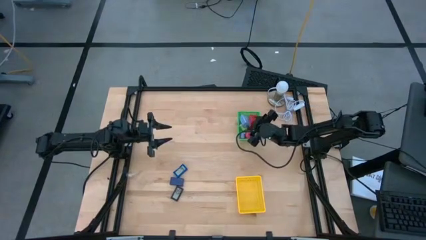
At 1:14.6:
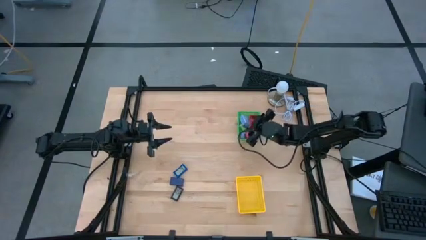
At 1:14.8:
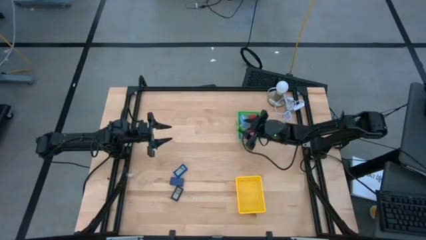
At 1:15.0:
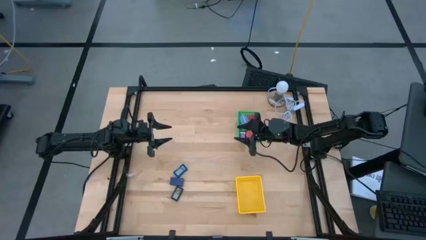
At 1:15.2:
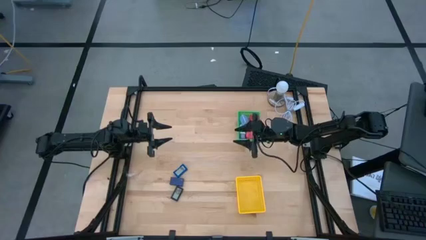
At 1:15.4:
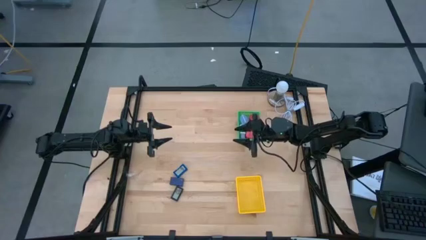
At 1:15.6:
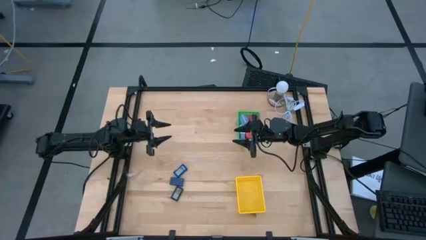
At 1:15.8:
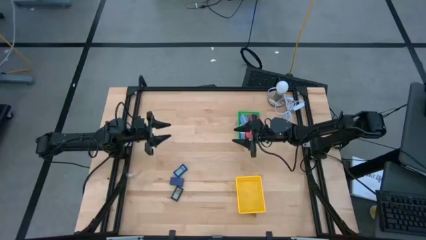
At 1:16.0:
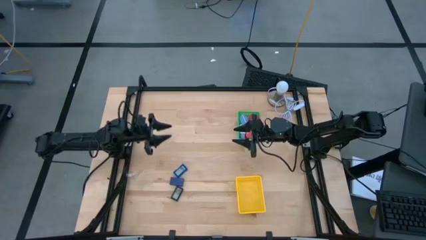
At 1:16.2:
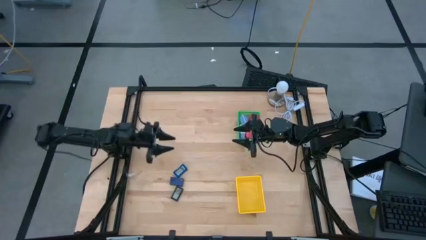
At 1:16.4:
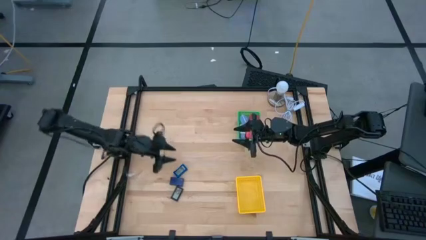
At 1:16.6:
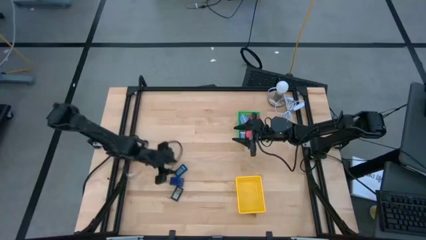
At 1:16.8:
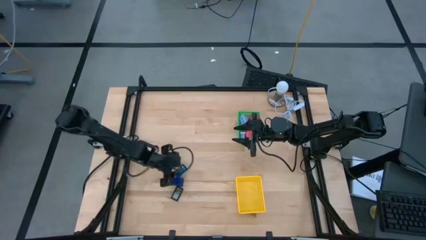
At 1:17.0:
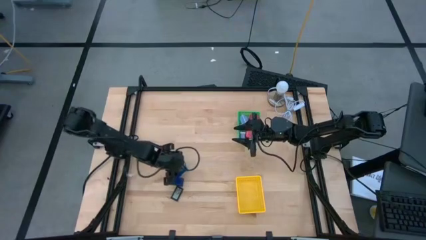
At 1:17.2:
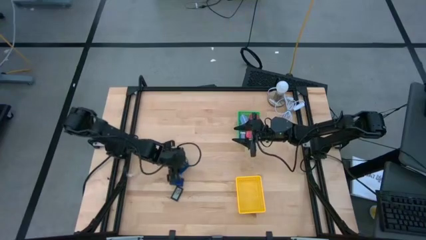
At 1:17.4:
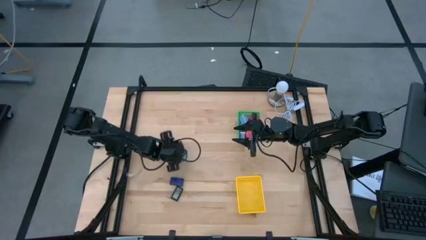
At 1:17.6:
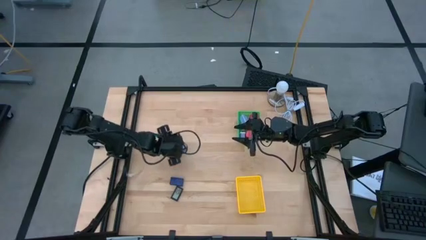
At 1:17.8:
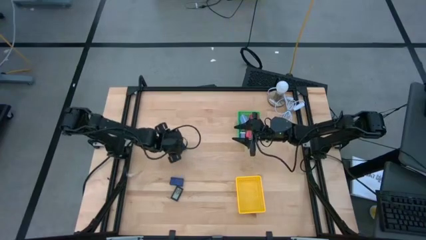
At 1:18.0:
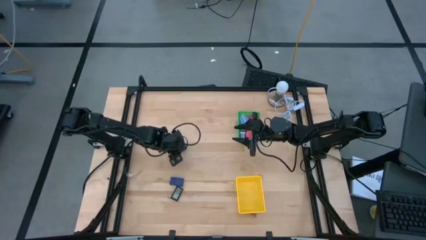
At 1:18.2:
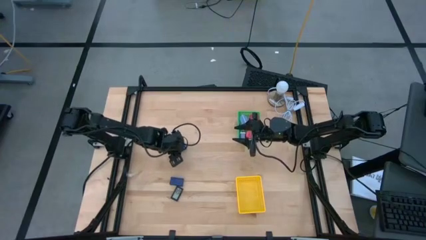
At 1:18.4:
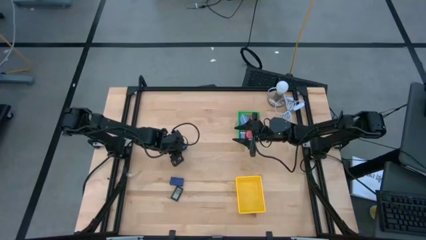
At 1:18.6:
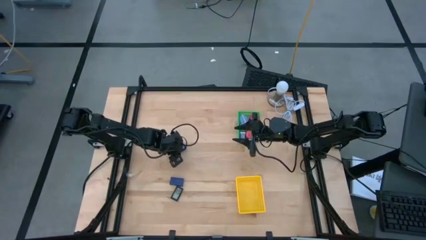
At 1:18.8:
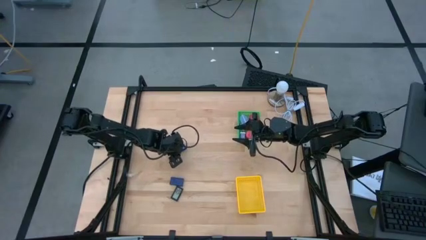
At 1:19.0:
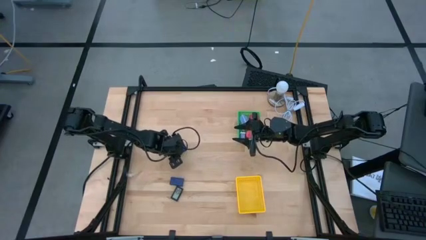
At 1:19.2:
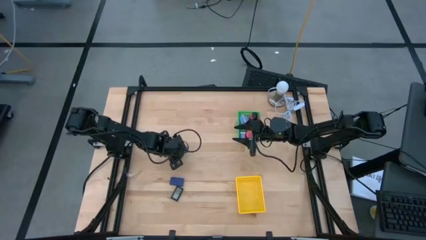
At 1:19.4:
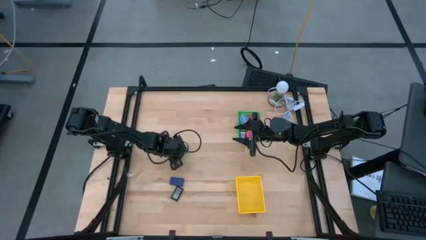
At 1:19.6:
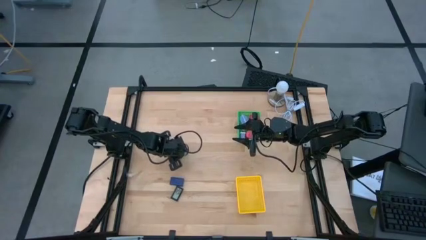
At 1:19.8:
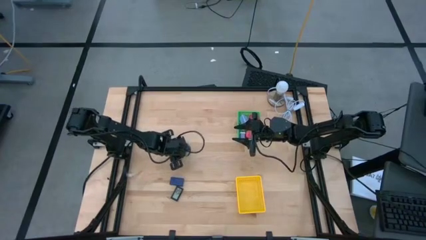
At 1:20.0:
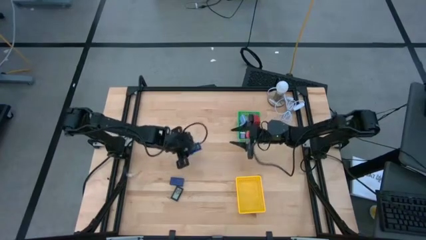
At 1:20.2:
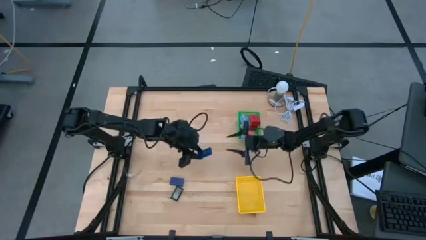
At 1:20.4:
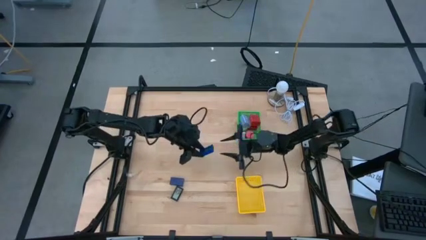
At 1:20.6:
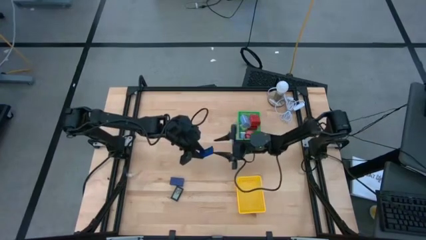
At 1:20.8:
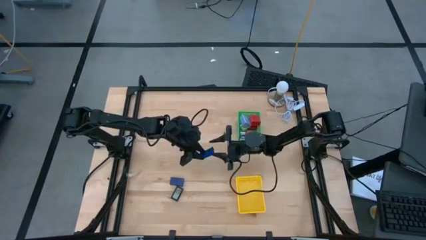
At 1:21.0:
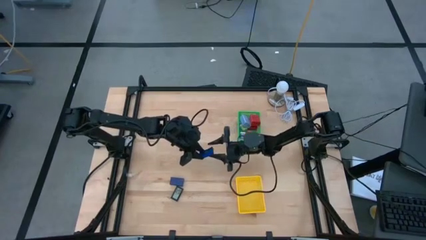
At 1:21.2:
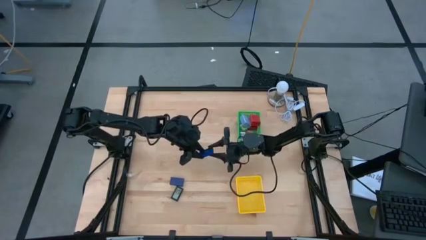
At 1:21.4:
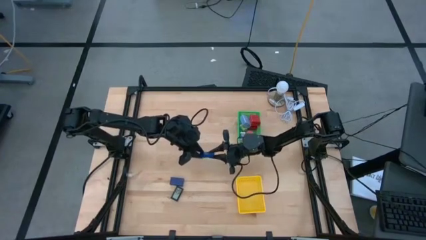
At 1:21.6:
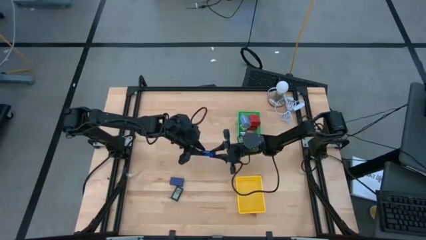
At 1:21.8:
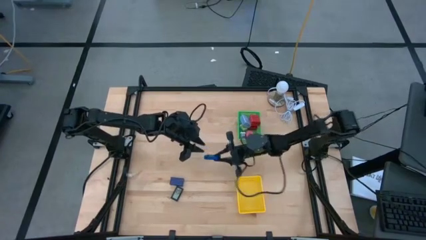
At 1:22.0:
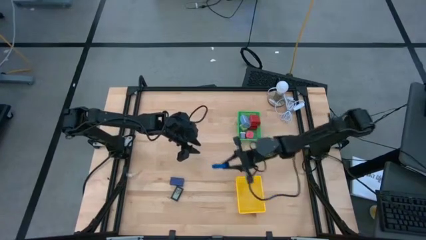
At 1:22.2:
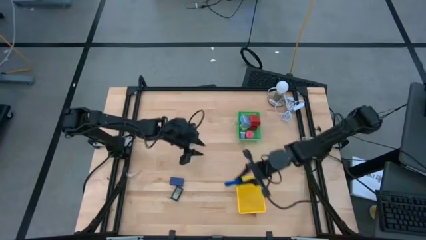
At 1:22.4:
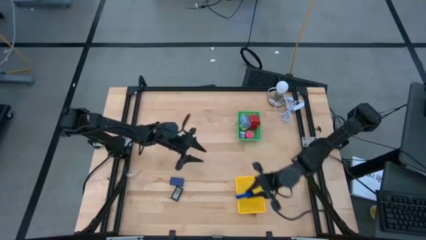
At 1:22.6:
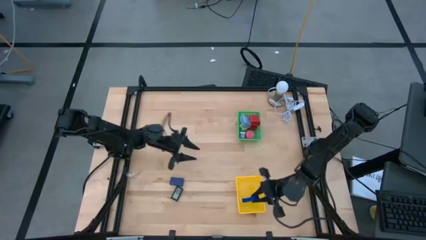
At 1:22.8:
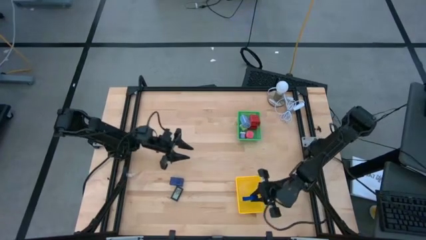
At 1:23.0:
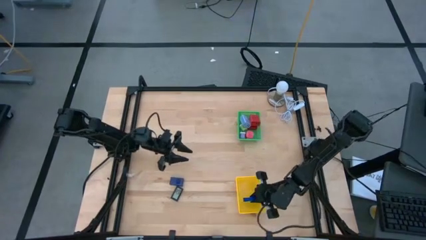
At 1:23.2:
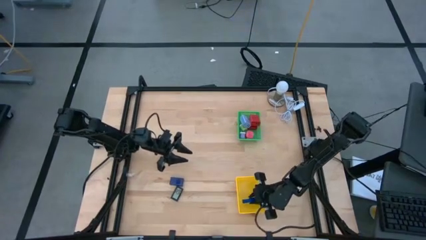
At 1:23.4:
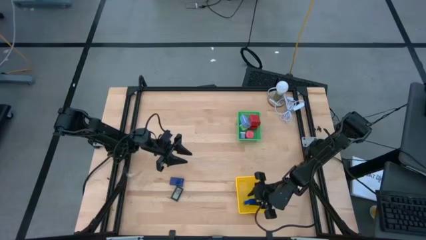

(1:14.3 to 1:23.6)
Task: Pick & Place Office items
Put the blue digital timer into the yellow bin

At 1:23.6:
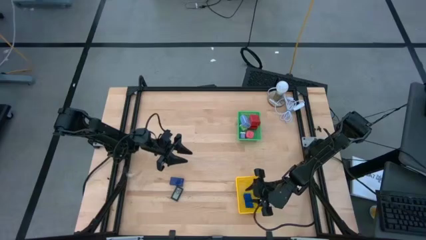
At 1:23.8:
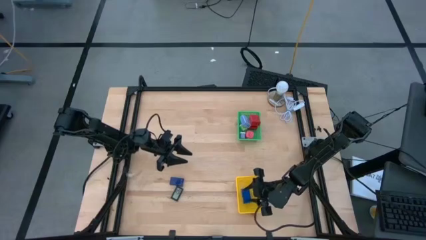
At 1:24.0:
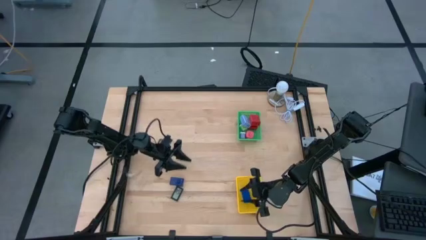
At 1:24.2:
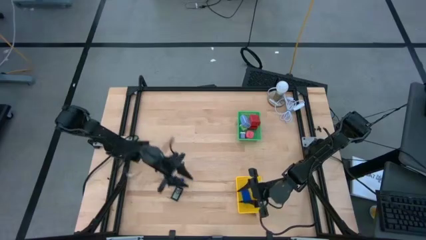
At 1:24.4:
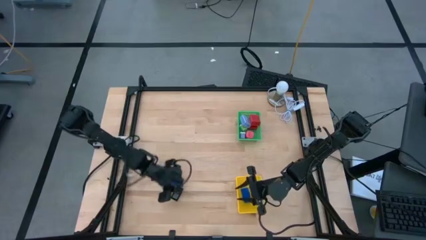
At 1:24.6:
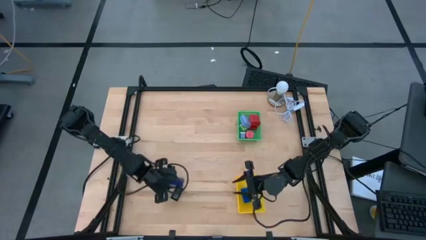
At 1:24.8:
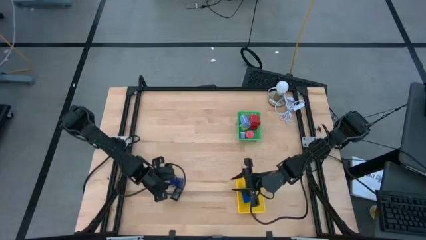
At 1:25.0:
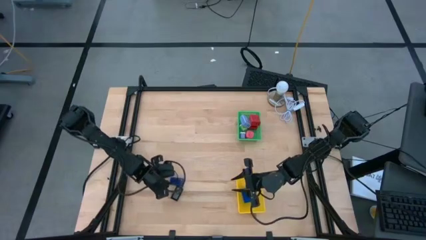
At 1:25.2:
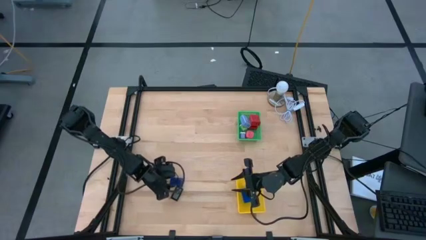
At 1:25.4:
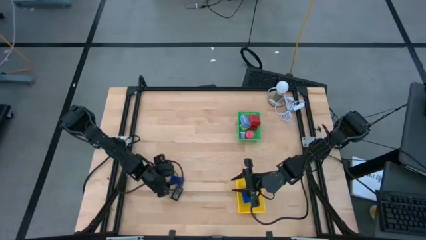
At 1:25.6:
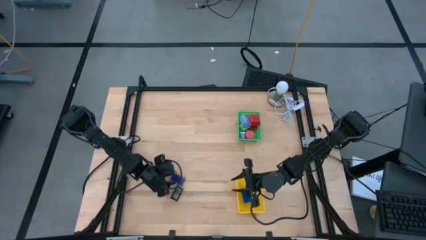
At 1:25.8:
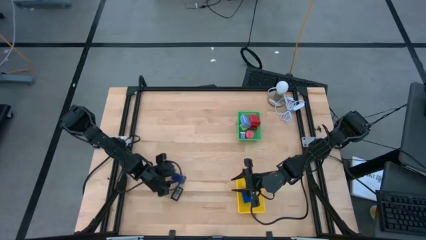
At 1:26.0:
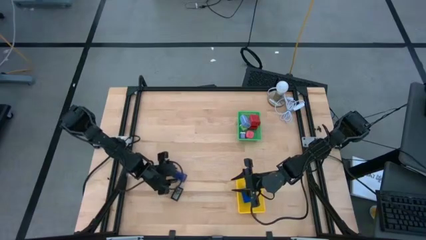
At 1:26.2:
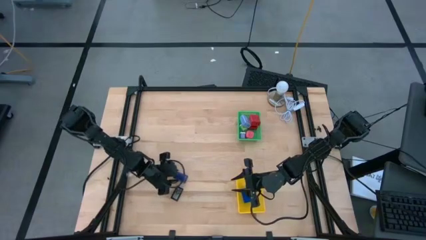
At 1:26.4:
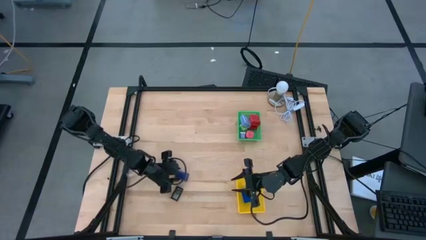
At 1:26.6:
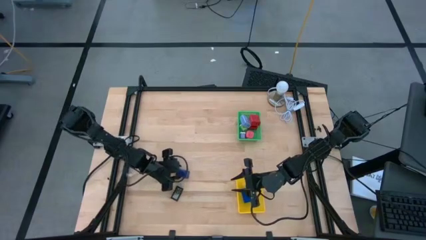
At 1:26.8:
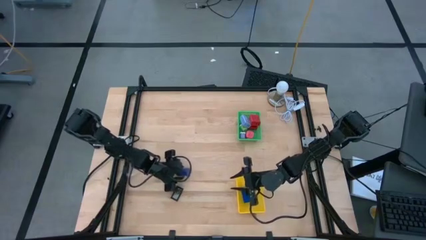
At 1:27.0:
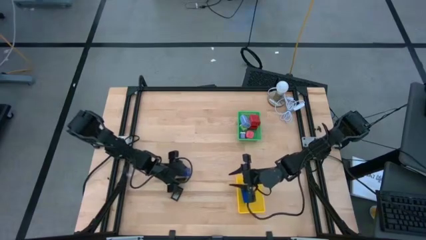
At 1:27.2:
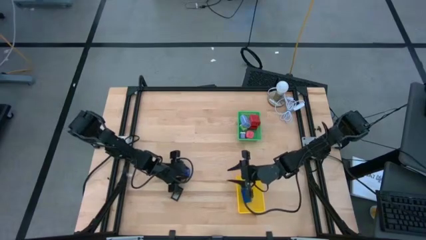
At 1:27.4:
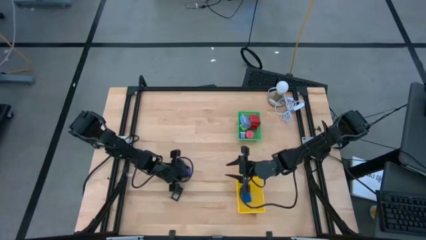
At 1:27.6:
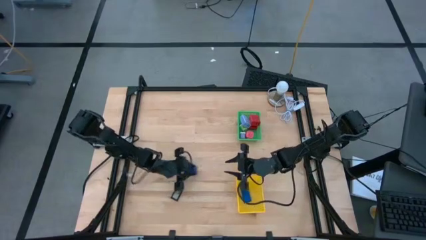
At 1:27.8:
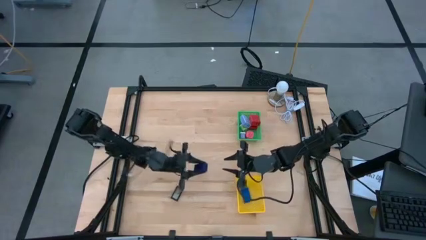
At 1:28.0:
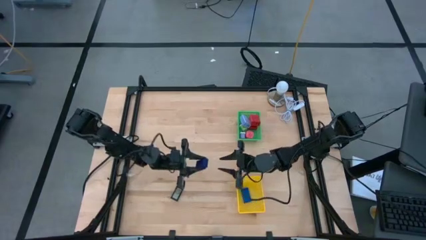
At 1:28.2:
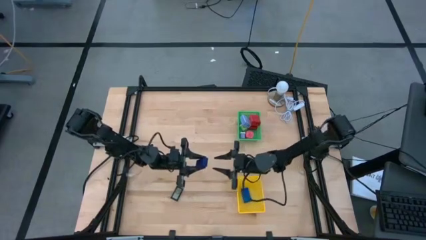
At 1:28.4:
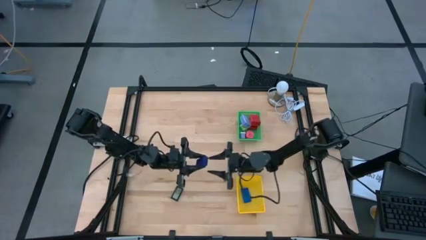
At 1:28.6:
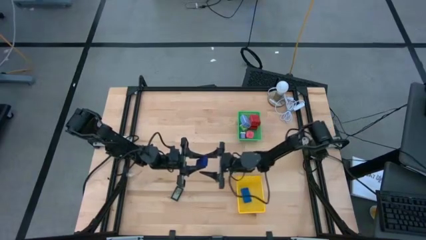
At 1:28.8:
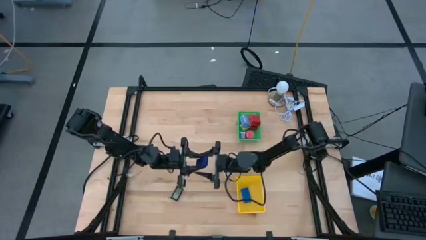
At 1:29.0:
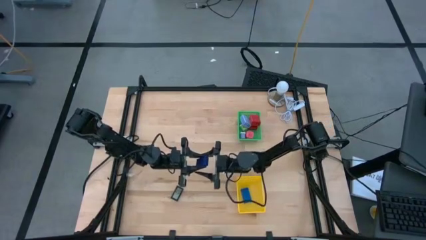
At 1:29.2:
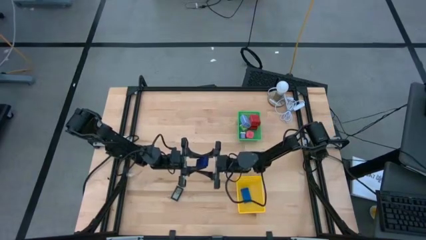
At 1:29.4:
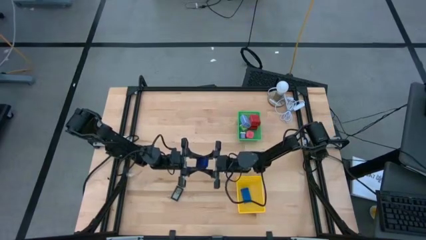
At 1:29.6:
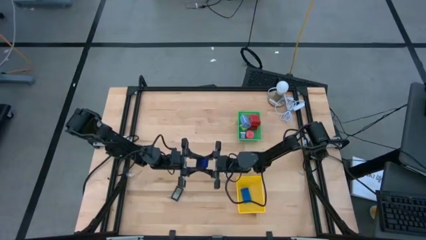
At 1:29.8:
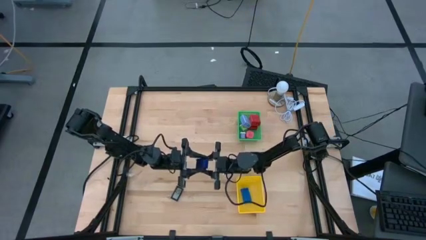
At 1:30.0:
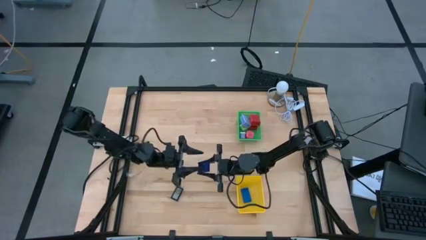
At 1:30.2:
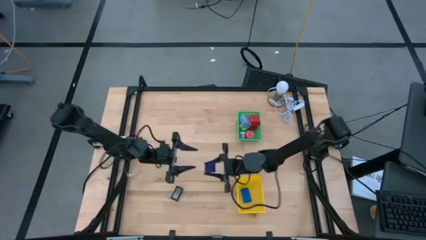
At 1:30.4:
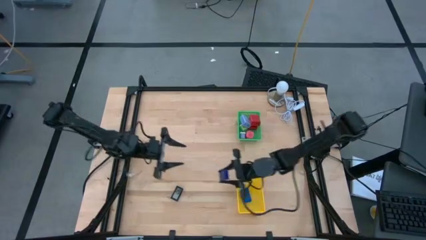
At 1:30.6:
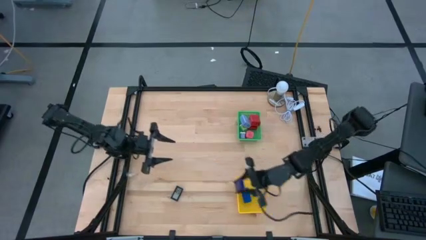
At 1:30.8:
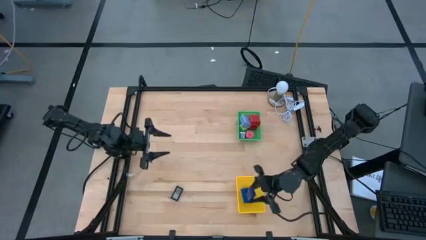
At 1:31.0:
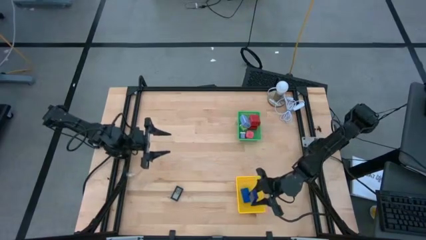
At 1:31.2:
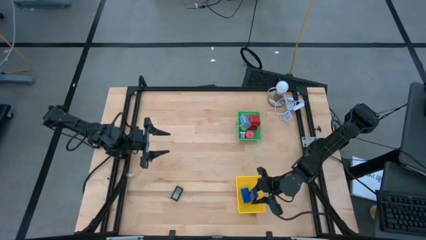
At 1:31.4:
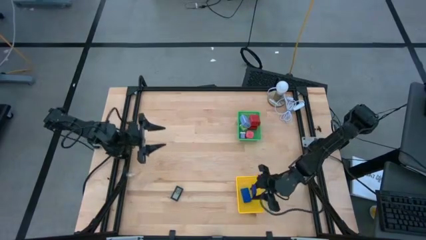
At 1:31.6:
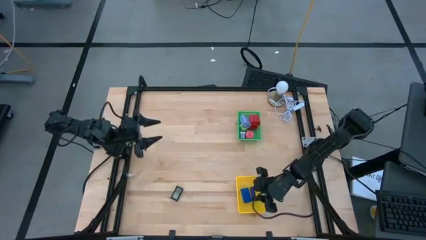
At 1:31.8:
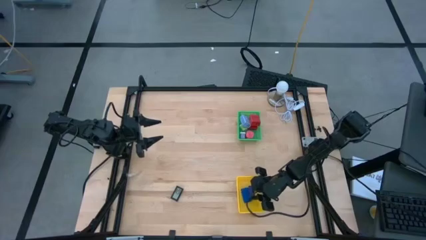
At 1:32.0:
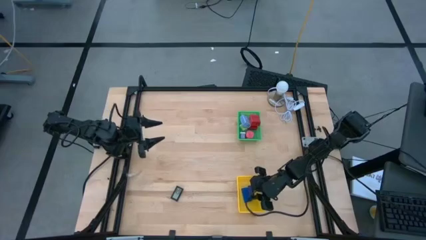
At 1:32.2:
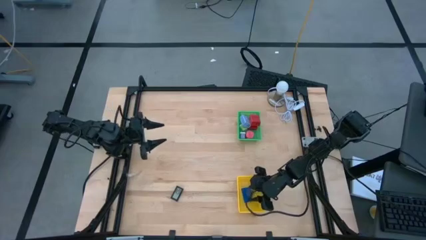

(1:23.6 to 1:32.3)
Put the dark blue digital timer into the yellow bin
